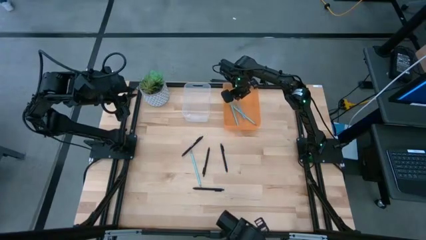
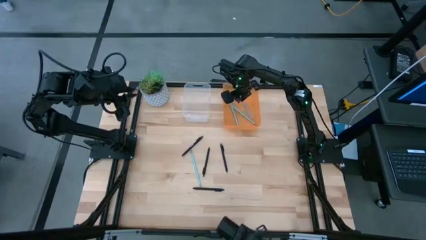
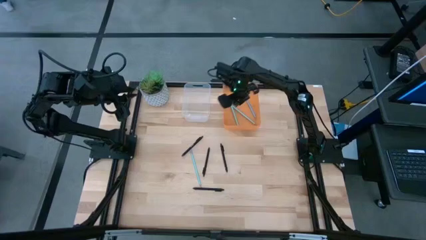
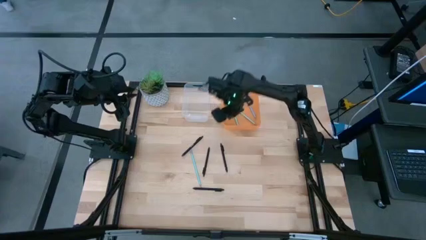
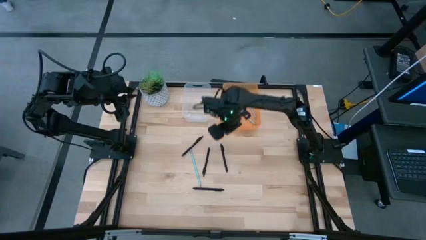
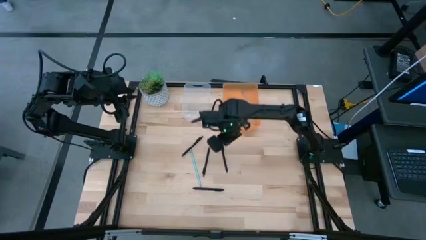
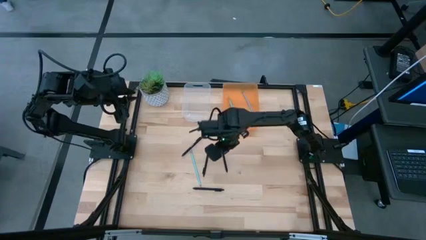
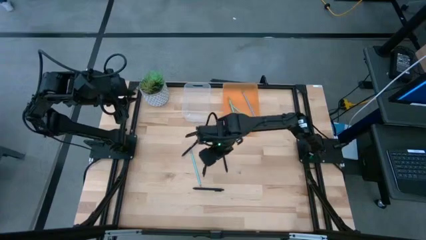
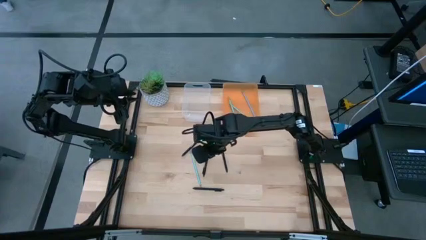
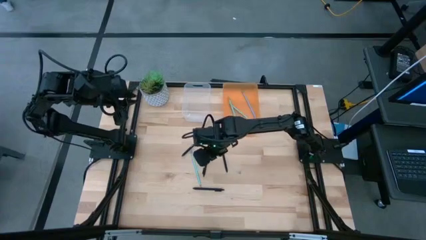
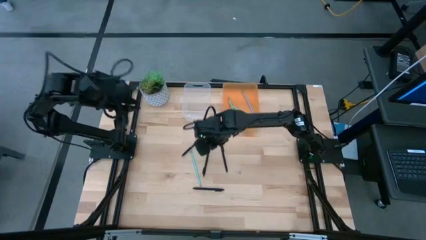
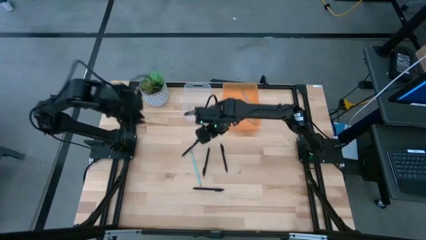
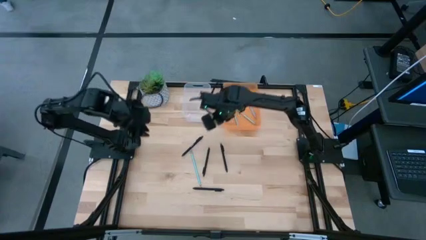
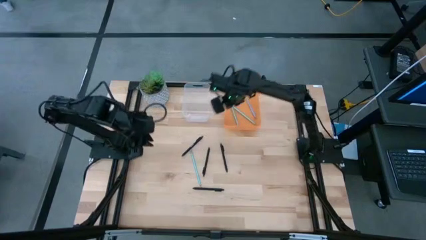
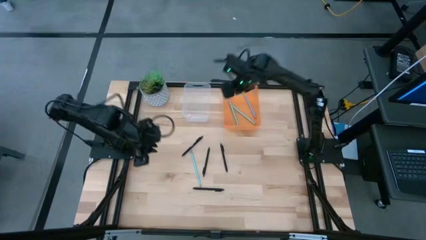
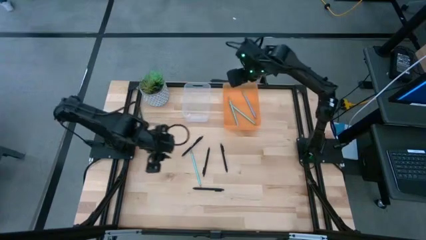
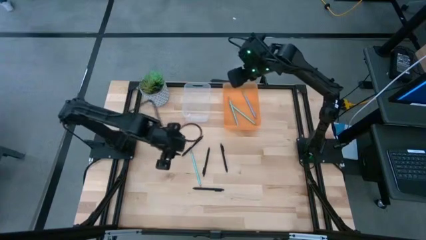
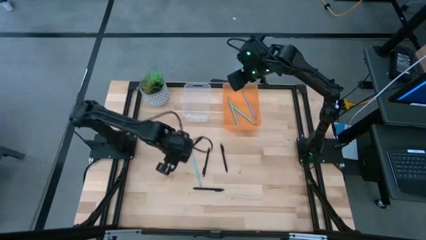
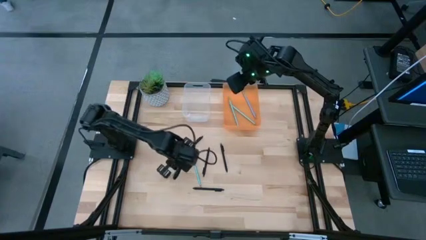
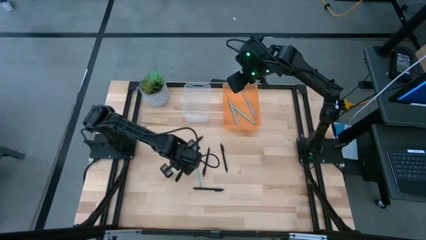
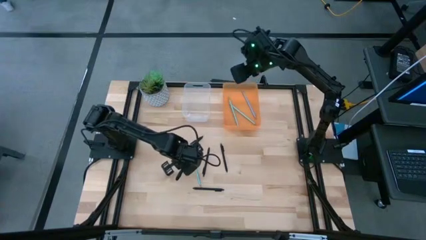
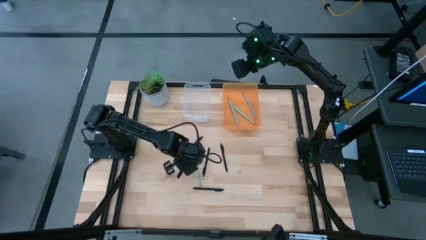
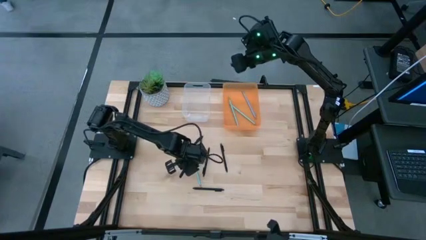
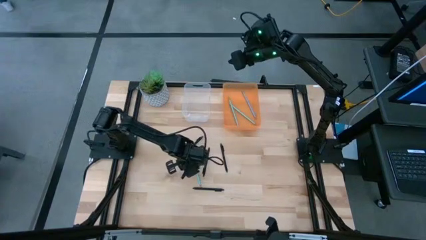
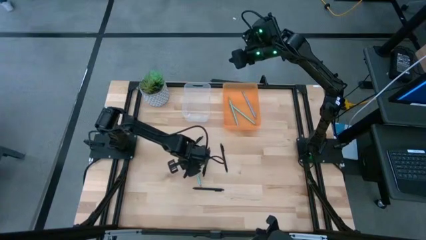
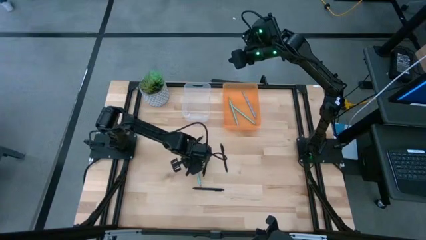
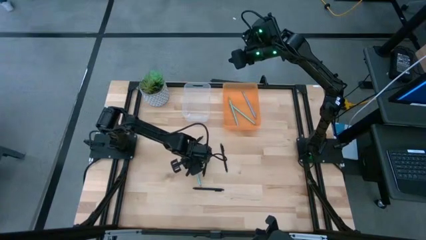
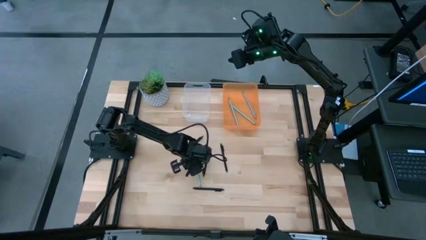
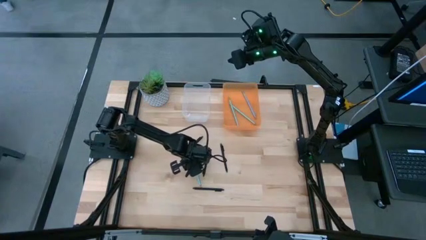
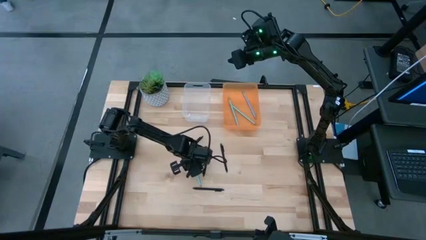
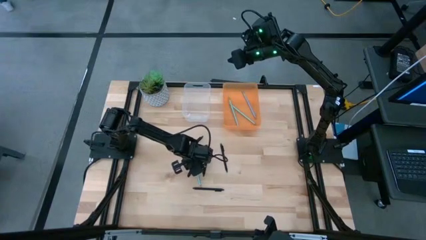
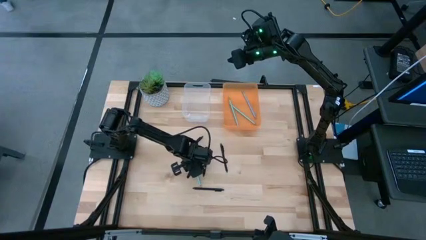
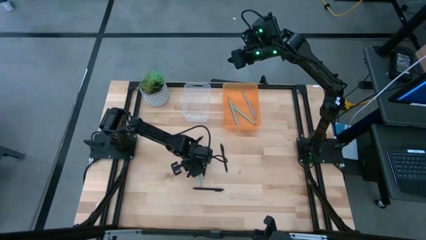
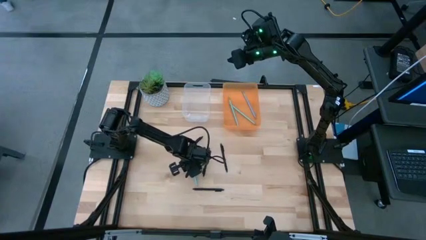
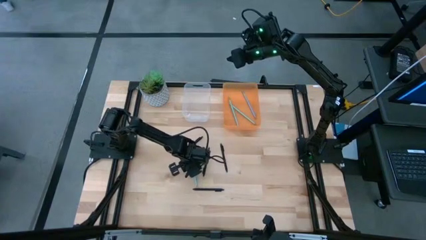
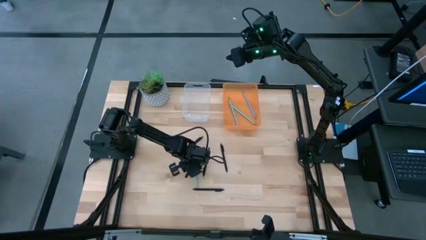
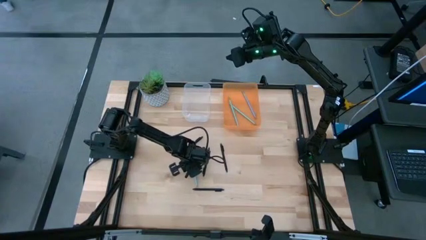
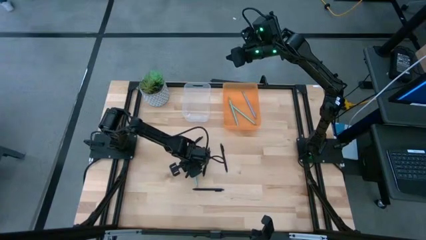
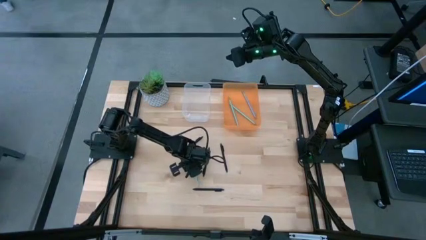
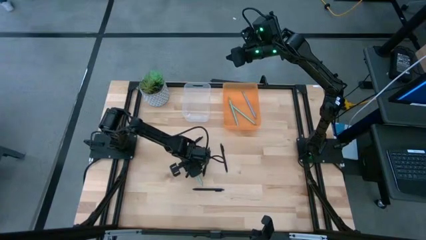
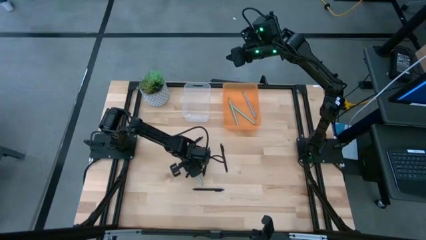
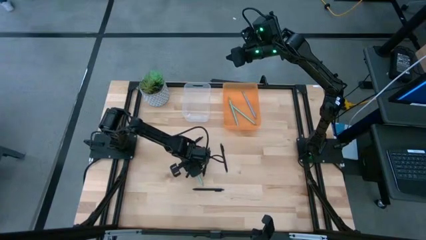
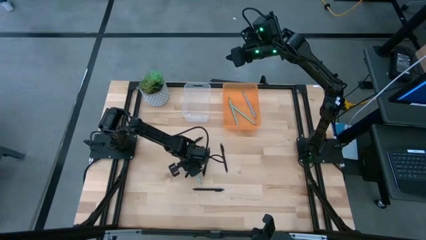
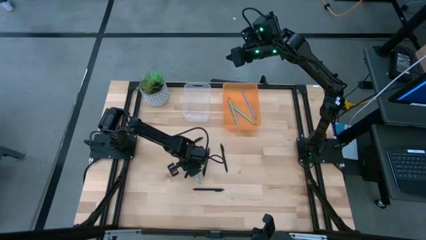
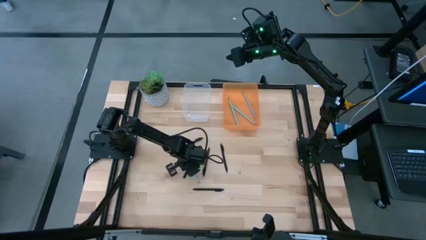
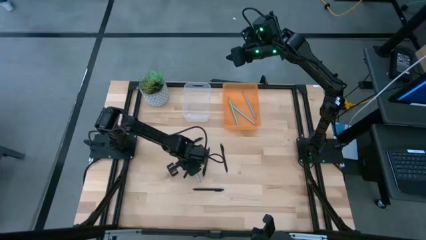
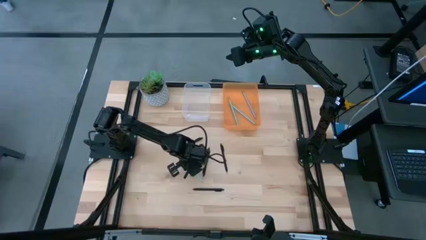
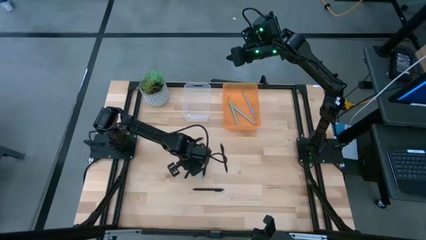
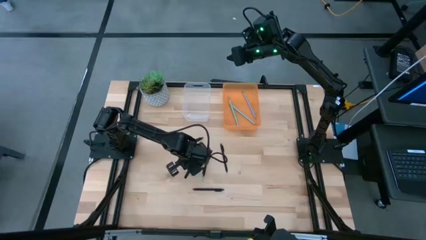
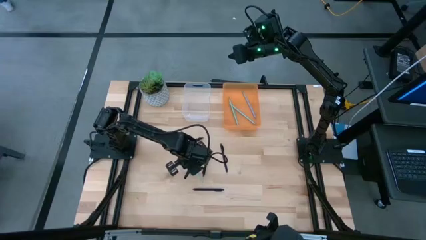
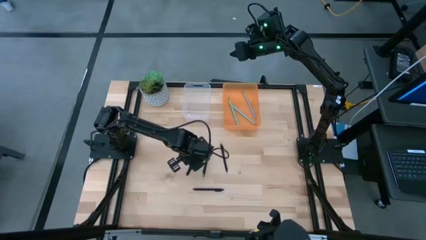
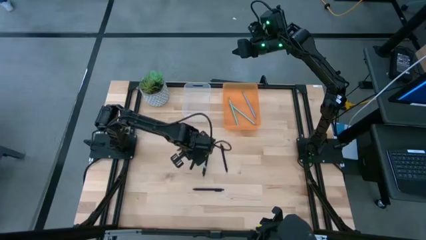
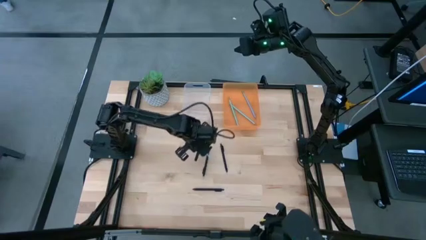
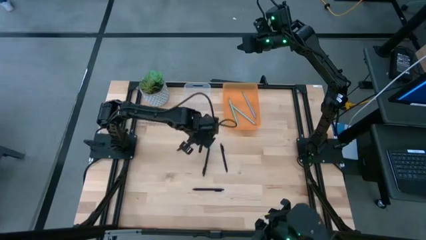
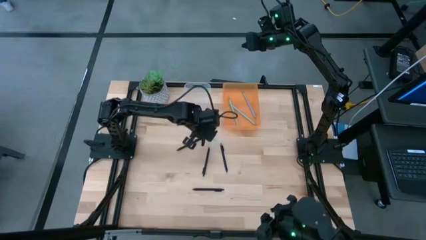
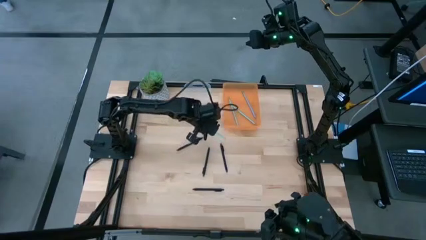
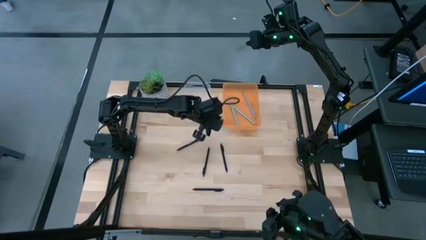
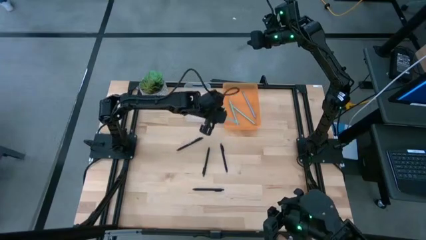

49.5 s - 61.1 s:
Task: Sort pens & pencils
Put the light green pencil into the orange bin

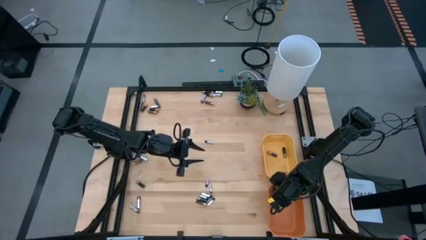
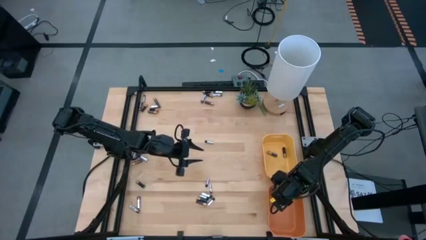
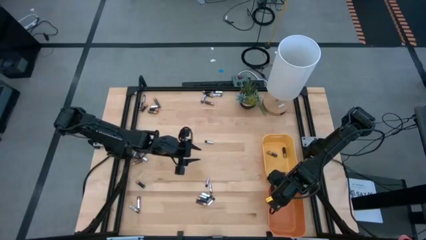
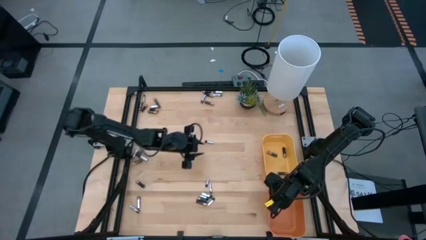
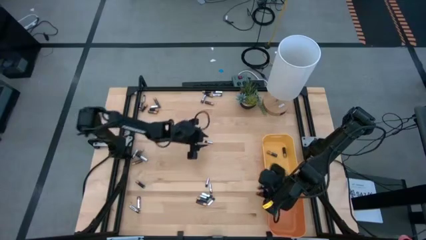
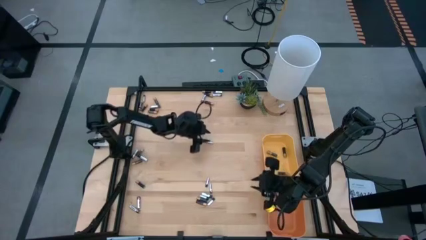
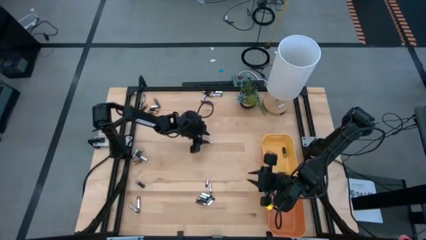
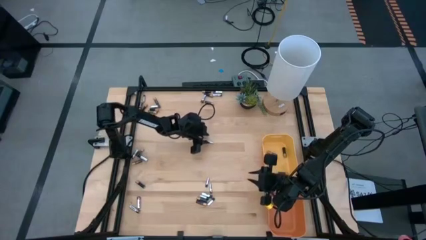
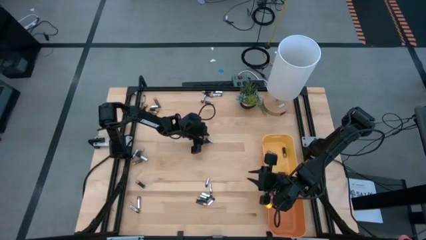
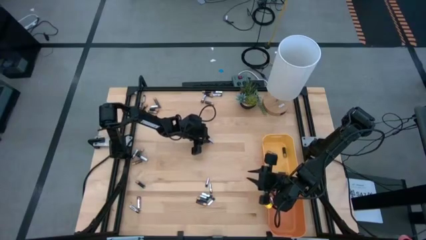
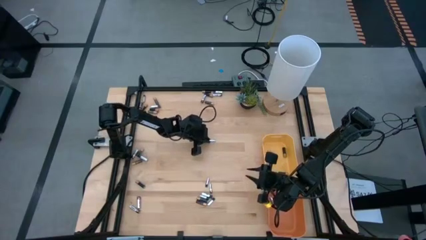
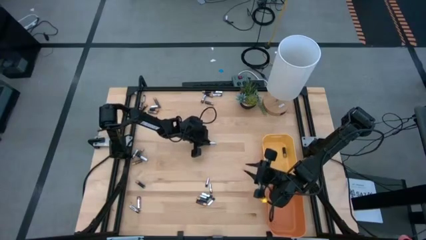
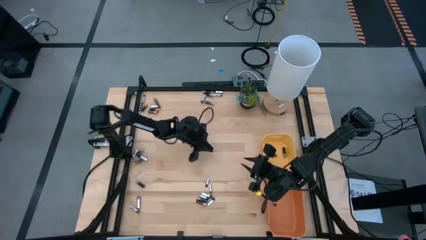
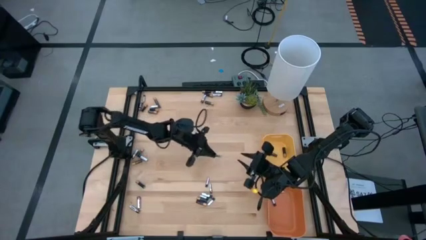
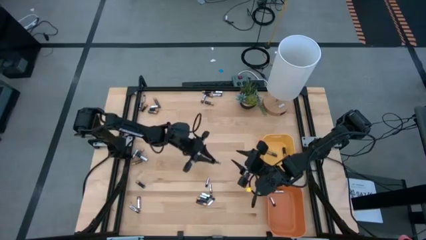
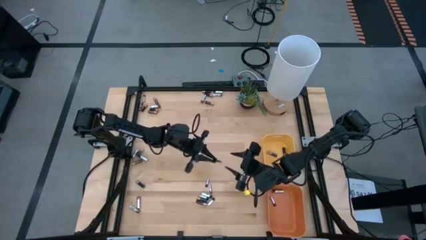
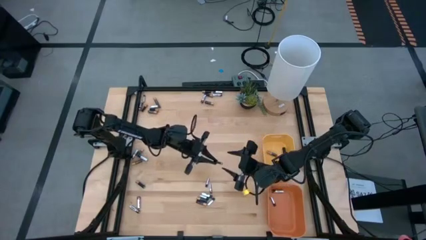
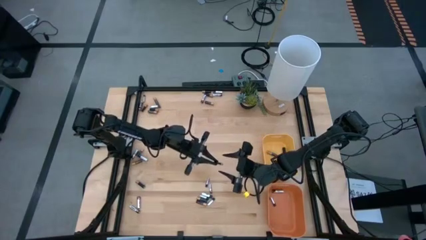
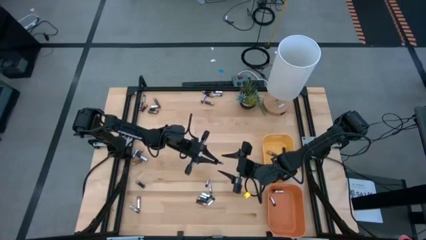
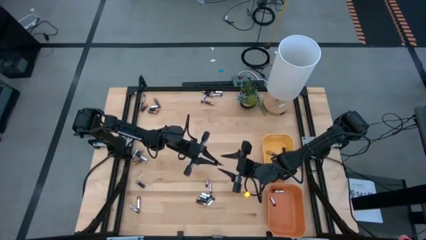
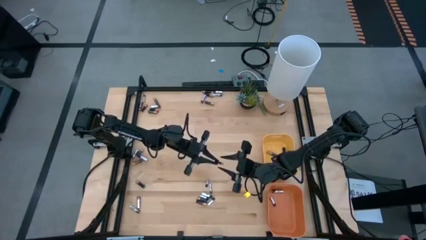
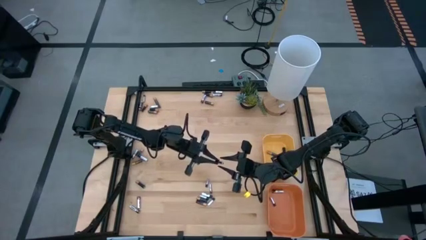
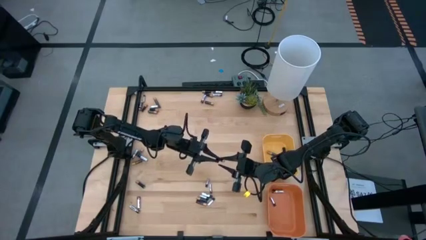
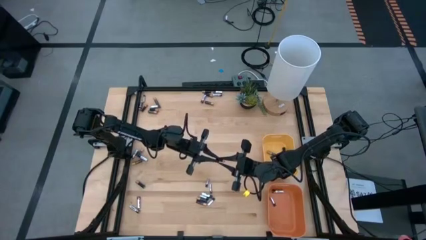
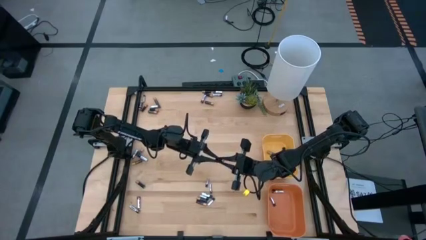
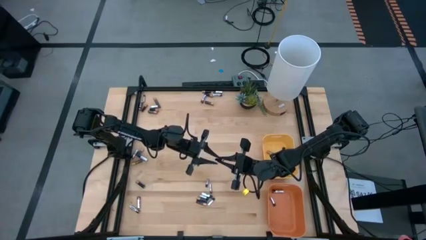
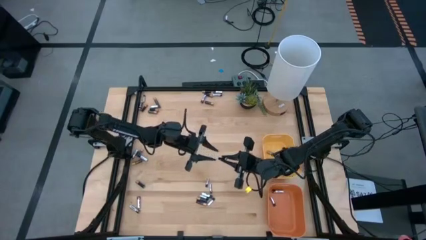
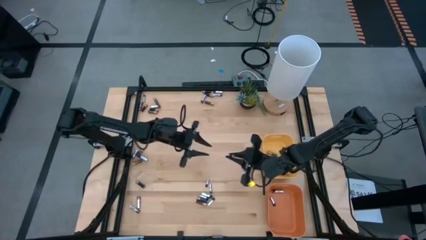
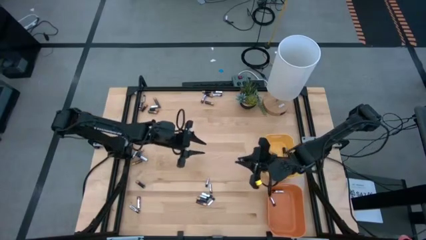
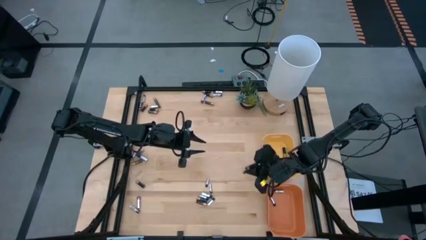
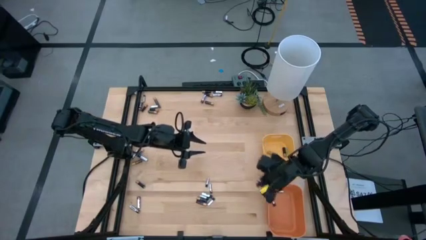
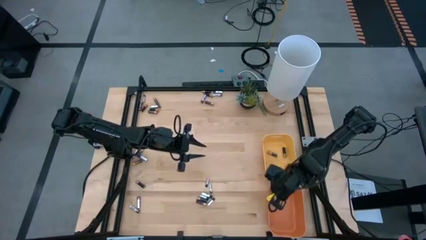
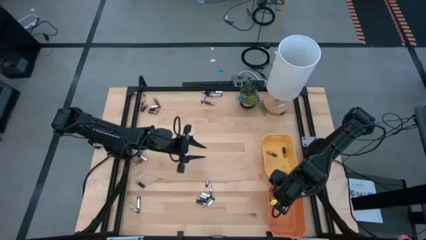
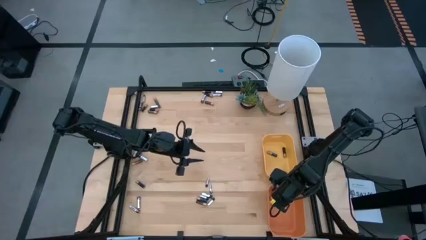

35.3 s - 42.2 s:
Task: Sort batteries
Put the black battery into the orange bin
